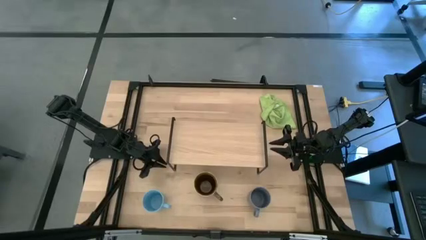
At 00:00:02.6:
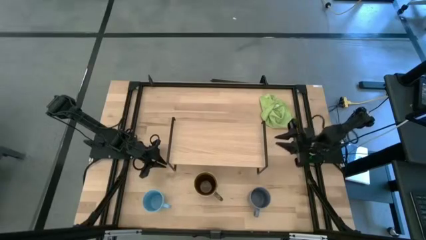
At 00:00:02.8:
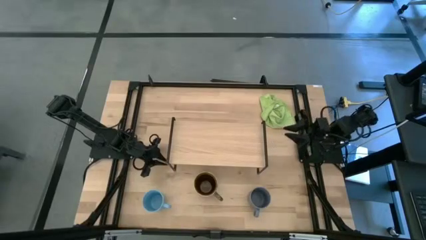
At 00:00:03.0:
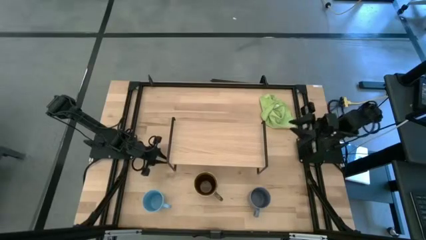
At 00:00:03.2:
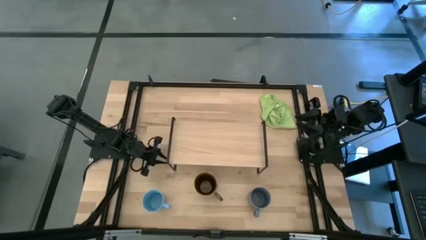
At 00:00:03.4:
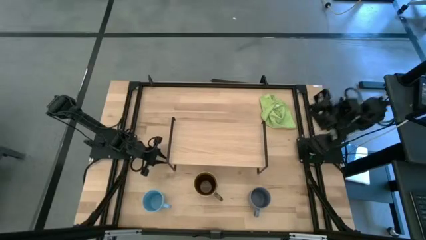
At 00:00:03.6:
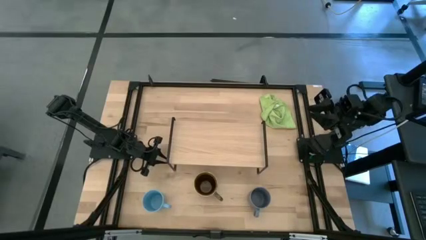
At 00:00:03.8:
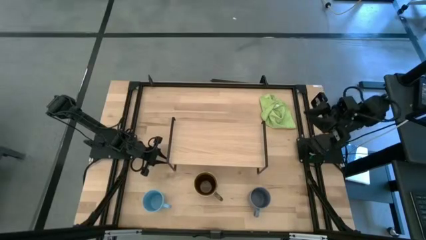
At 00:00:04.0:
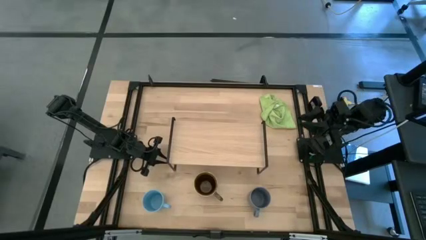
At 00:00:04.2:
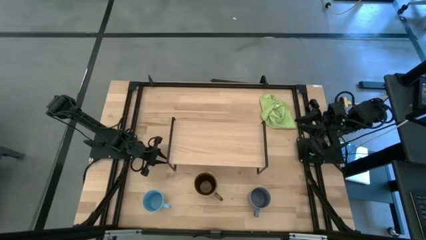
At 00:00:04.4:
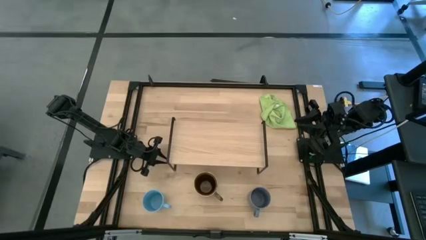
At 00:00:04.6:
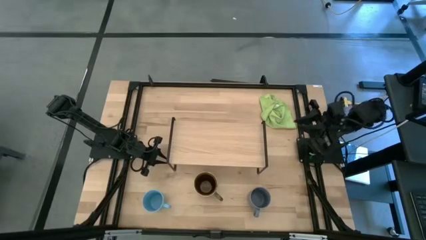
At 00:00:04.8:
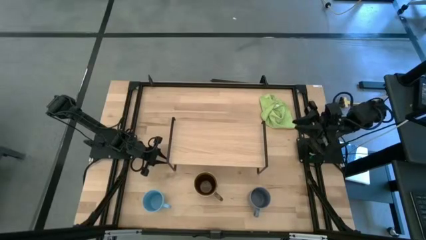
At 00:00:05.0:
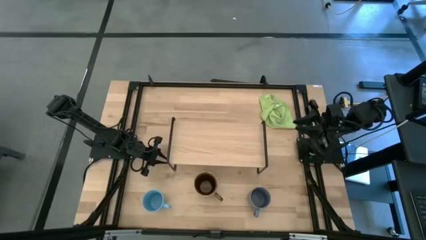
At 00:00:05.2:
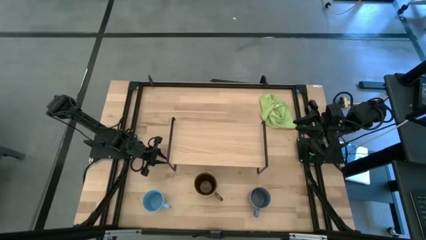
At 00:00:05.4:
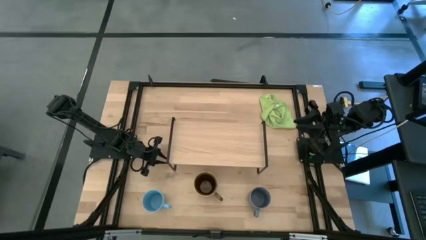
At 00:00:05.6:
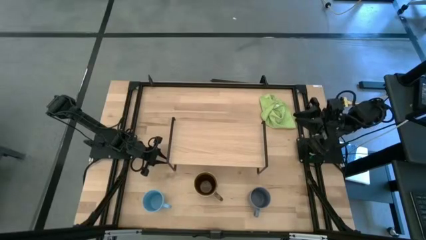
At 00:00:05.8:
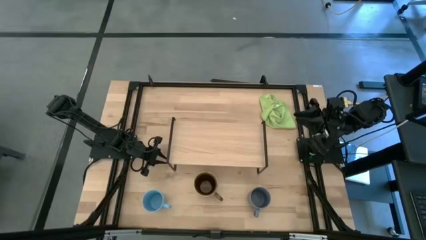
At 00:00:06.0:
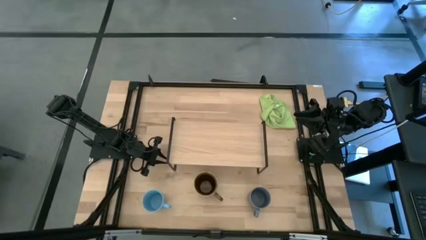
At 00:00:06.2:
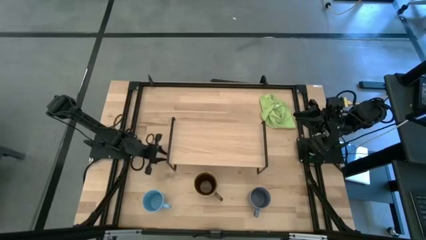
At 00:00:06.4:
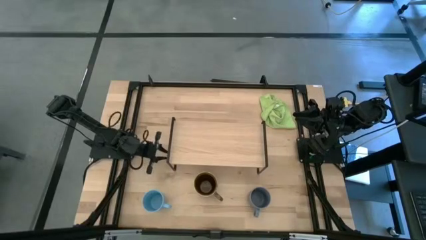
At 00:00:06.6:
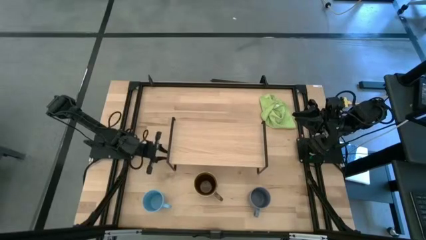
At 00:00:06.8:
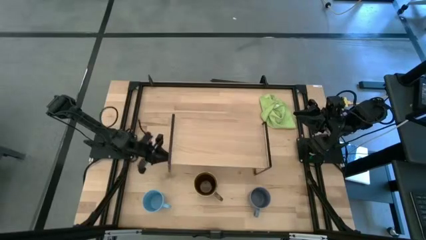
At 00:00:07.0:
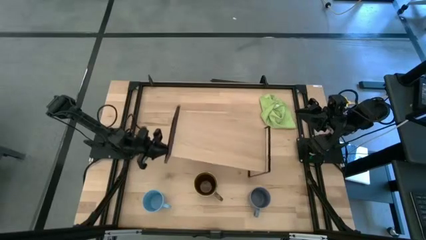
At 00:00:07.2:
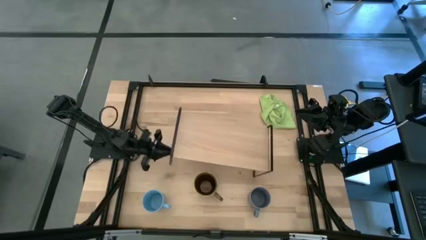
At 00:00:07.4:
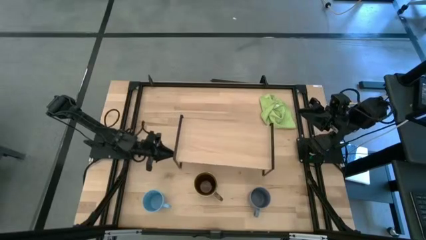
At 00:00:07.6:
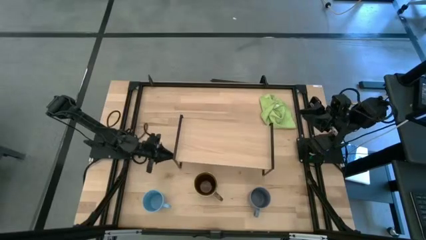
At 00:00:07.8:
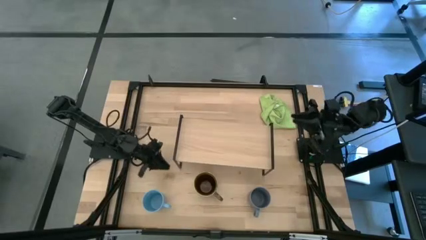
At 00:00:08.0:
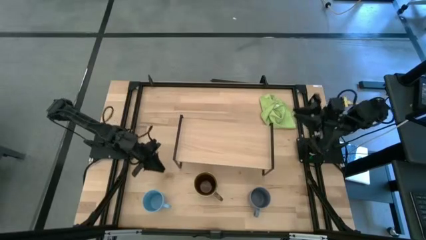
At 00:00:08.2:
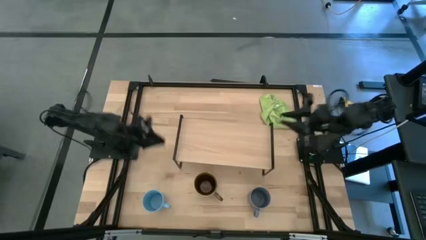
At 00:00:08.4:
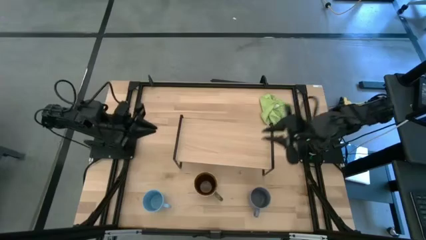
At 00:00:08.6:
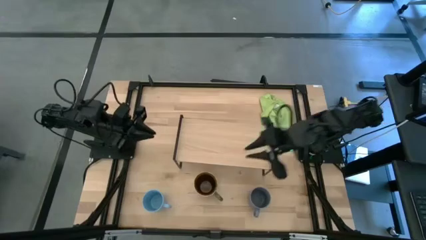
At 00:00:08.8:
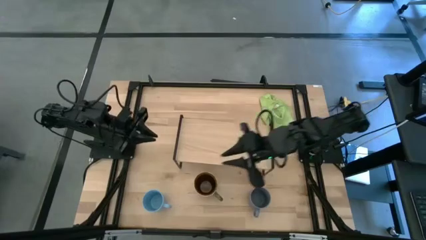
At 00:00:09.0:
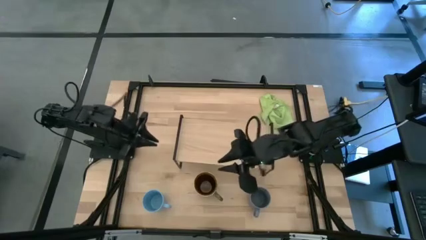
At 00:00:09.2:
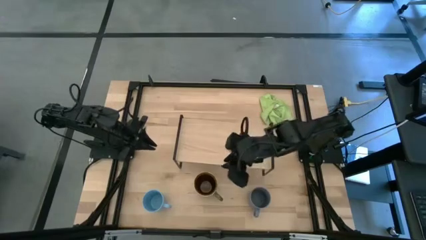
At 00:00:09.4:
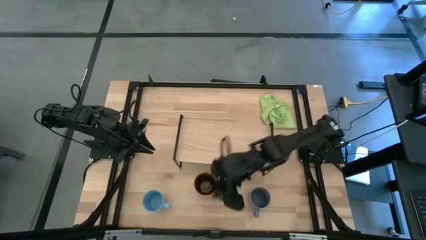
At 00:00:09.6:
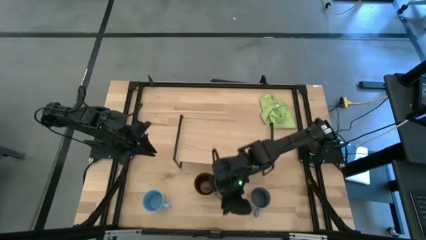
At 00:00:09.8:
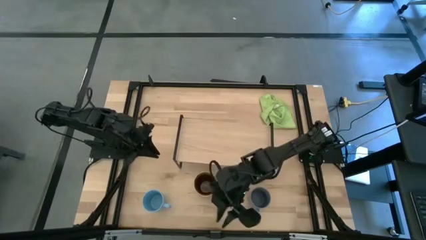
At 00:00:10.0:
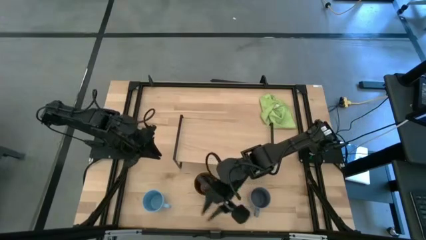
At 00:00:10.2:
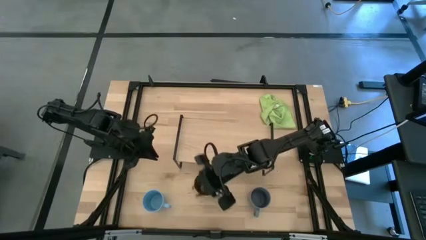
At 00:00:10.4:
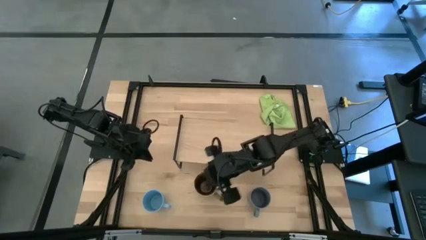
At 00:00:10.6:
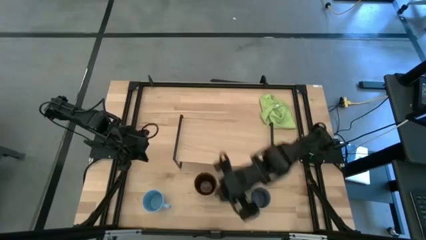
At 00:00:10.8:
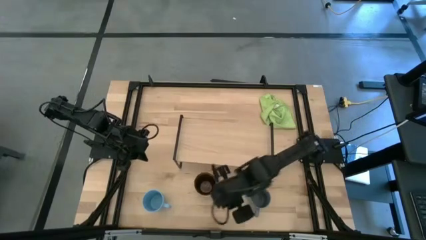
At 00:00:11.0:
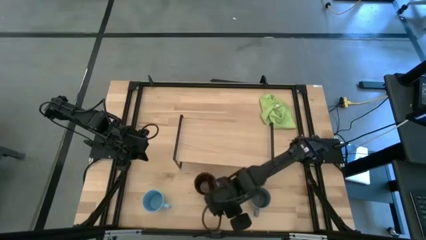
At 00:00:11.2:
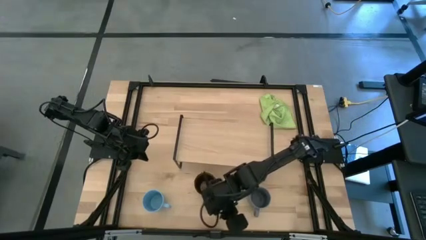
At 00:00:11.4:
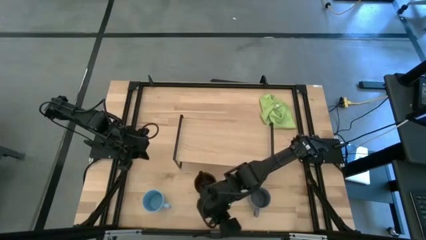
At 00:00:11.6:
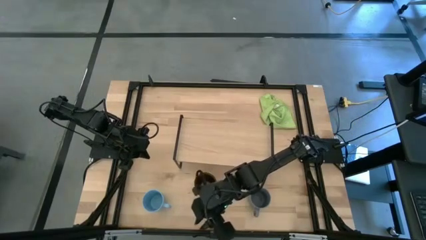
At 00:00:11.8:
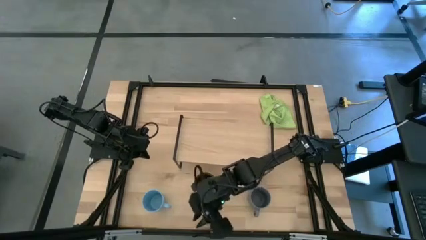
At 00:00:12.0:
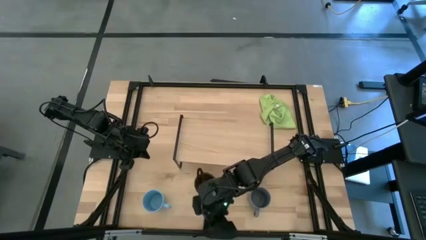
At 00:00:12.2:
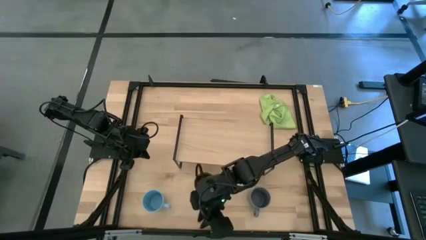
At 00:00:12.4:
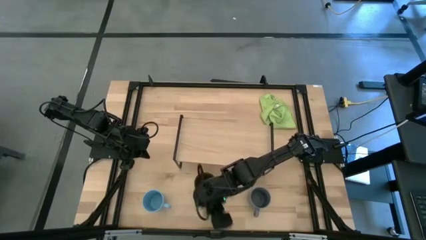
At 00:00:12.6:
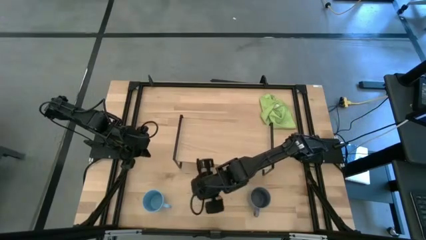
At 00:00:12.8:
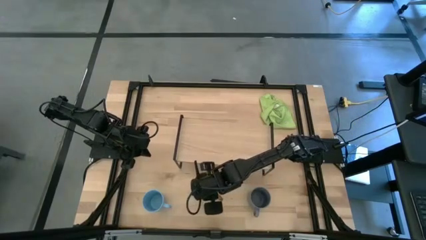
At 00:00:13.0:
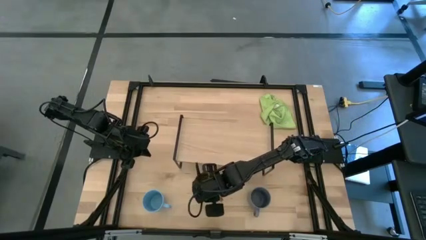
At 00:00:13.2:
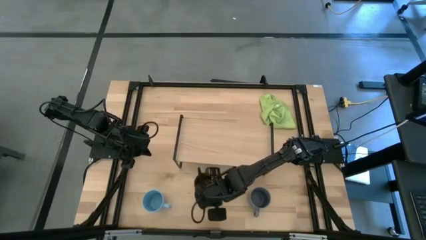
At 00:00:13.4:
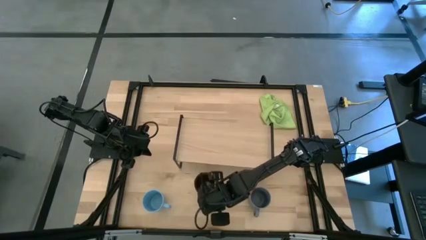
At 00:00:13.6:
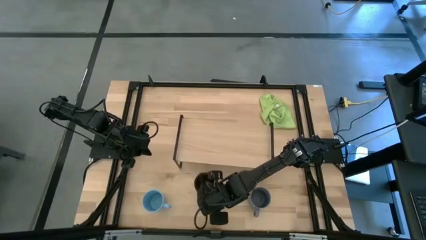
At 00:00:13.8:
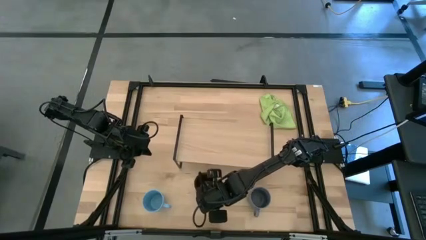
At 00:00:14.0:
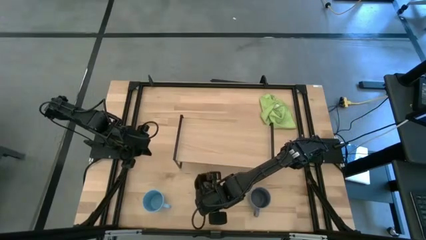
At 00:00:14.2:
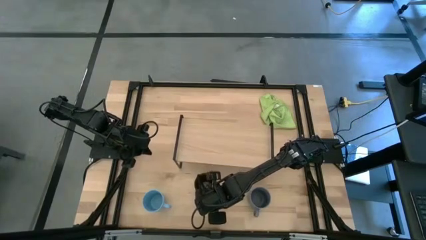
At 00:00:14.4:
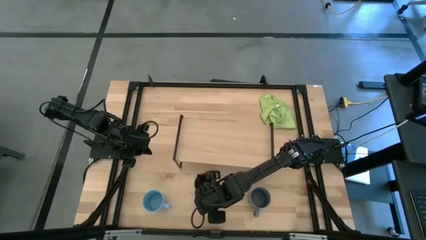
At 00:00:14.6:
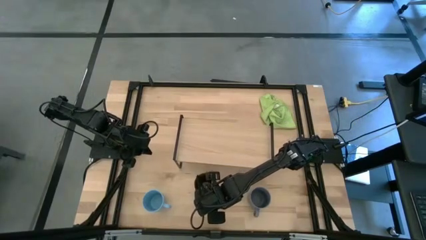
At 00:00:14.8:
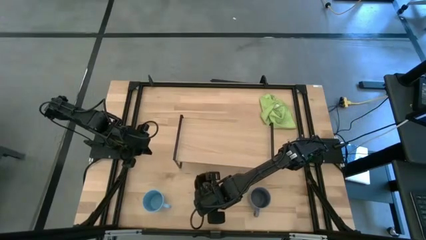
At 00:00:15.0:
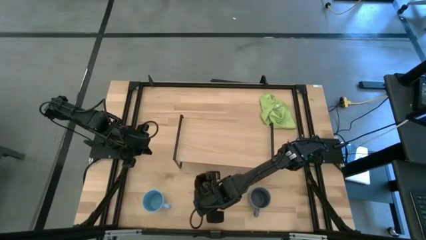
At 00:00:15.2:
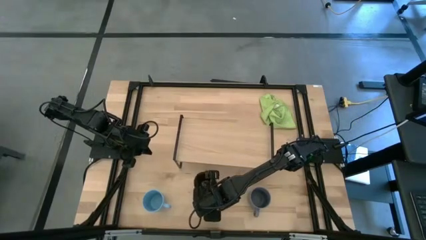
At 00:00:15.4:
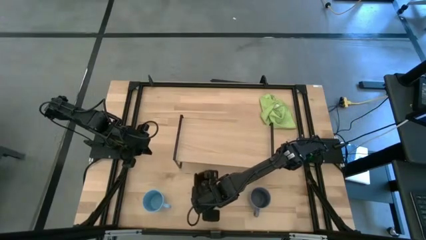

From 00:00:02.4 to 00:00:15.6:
Task: Stack small to large cups/mugs on shelf
Put the green mug on the shelf
